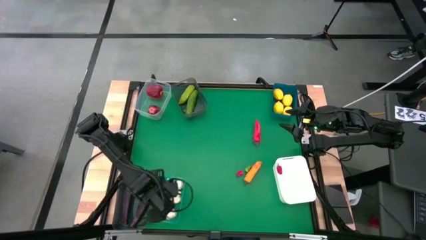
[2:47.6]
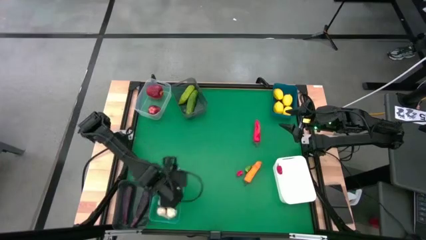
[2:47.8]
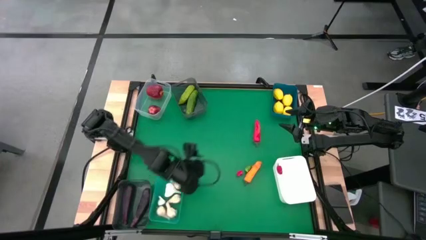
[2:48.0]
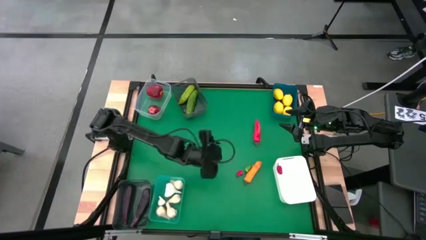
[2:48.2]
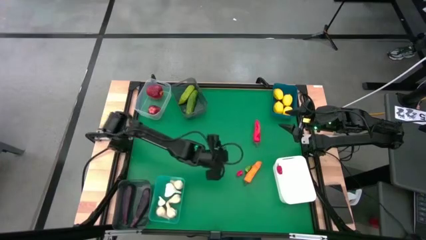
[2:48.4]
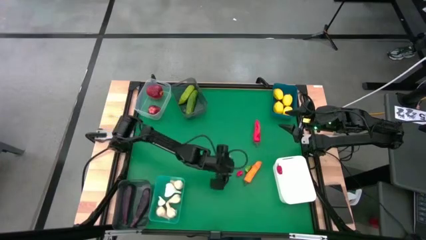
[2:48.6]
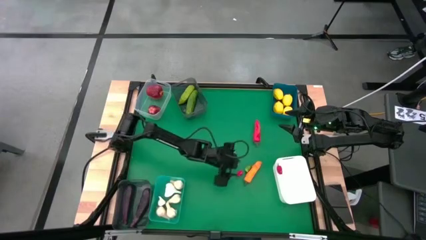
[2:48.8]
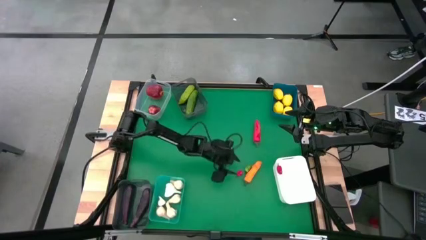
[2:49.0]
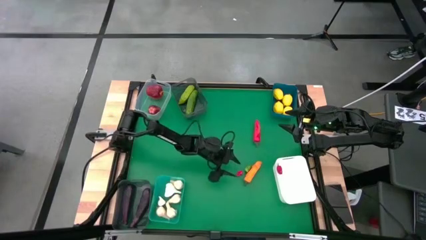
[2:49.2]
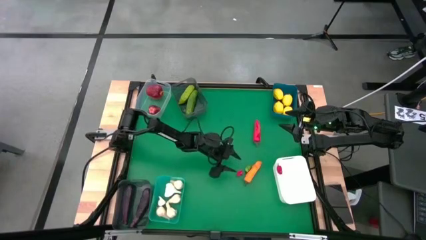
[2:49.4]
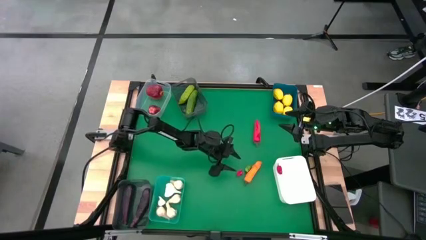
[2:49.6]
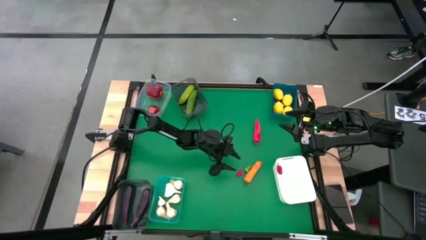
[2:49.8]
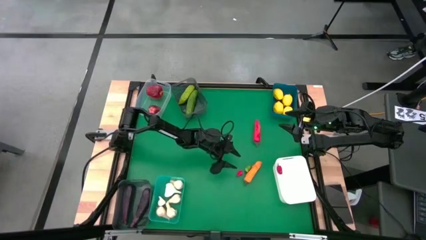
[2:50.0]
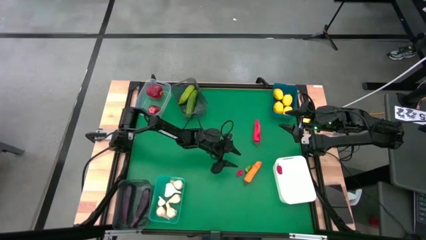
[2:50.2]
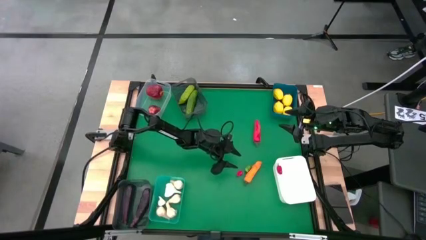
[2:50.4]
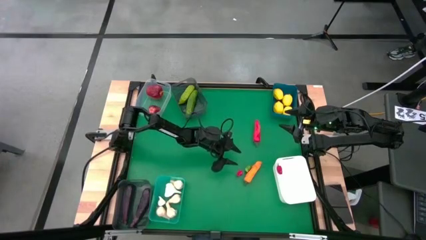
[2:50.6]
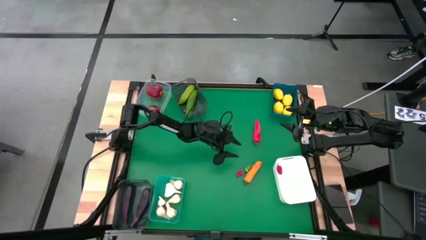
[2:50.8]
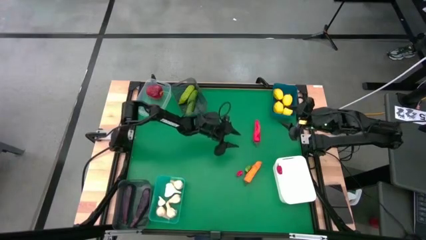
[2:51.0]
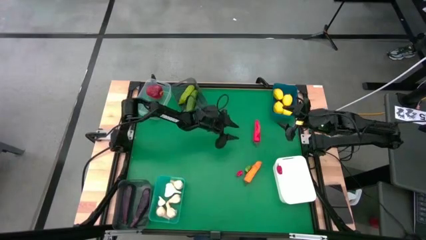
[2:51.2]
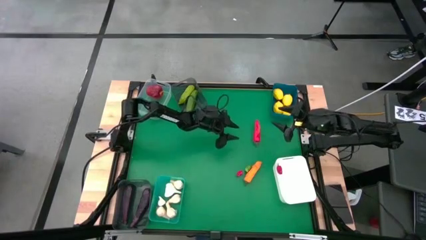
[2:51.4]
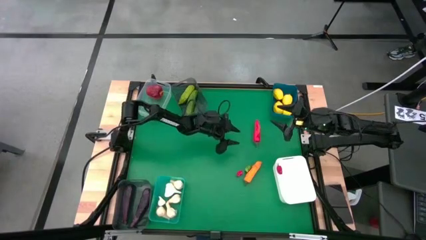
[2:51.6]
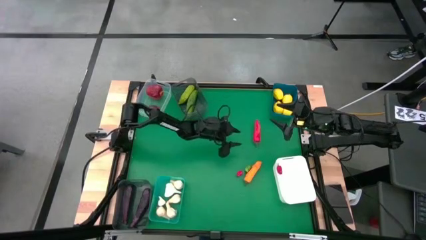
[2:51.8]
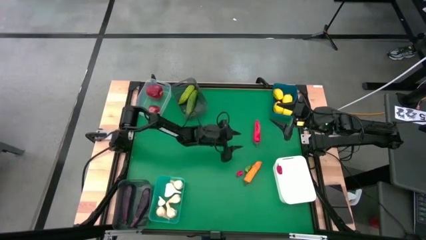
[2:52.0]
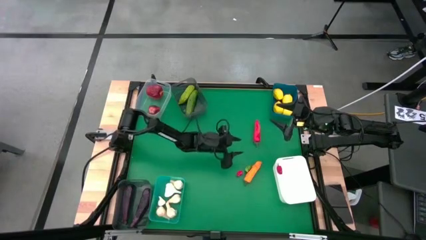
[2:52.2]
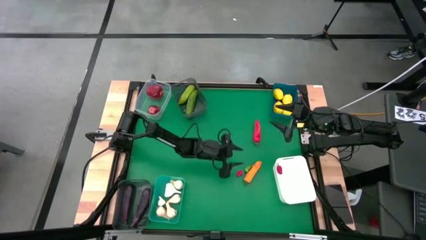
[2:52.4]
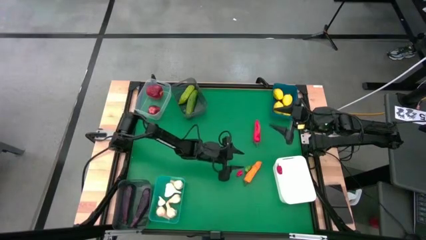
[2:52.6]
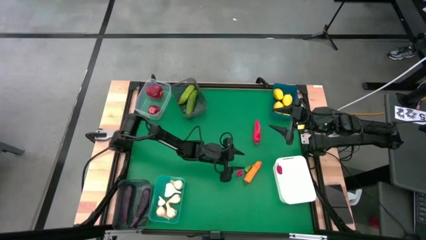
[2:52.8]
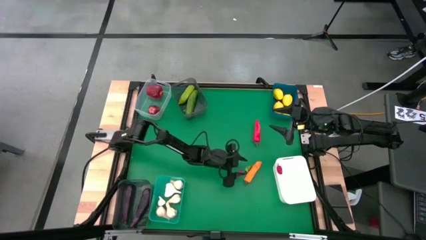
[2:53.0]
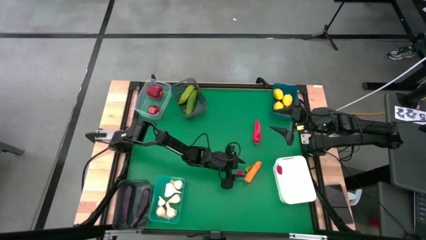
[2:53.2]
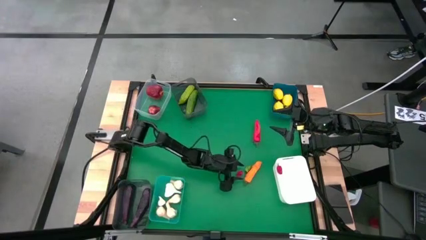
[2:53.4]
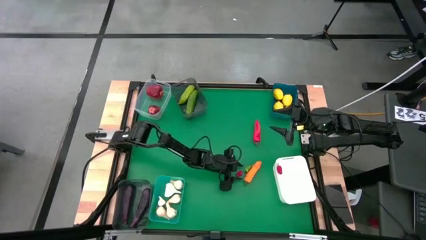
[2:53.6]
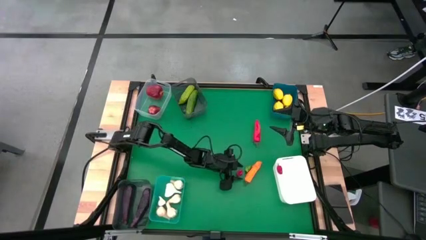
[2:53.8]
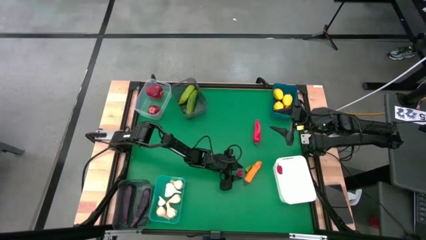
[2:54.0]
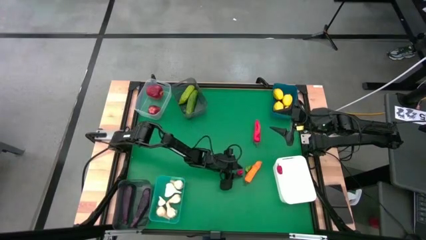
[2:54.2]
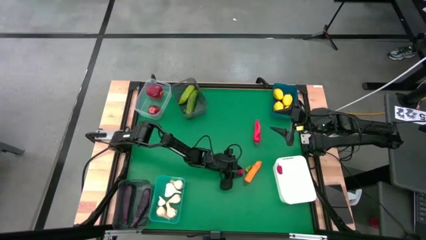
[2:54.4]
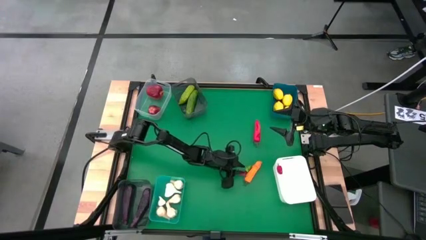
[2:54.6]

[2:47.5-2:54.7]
Task: Sort produce into baskets
Put the red small chili pepper into the white bin

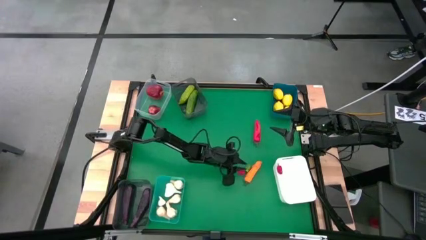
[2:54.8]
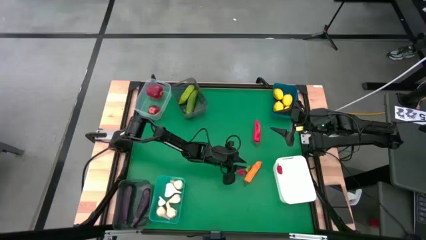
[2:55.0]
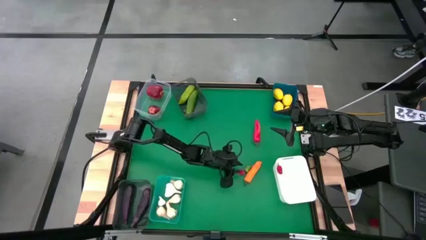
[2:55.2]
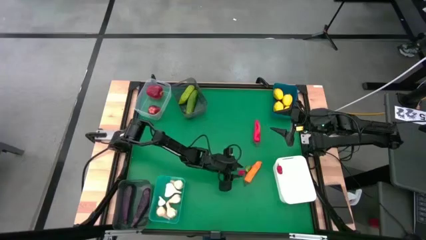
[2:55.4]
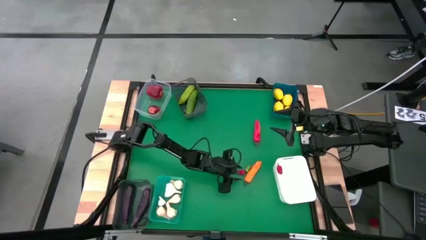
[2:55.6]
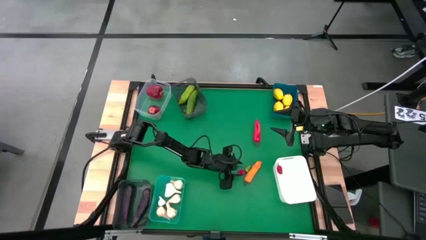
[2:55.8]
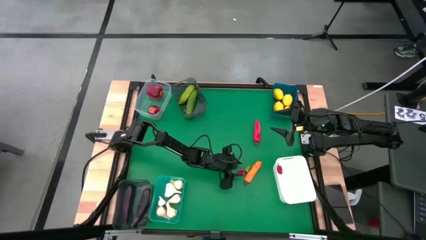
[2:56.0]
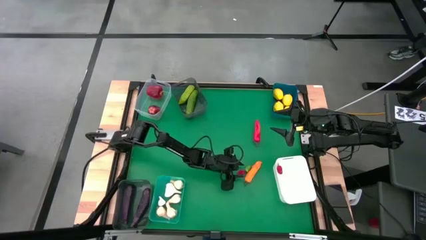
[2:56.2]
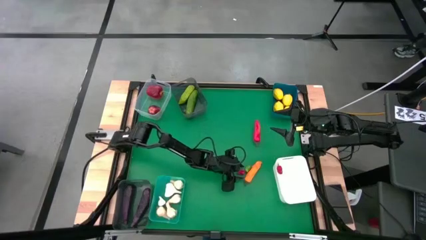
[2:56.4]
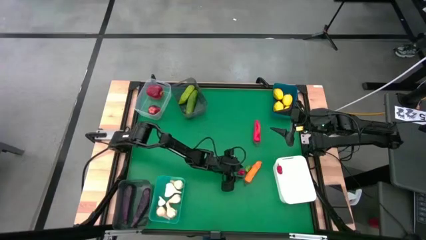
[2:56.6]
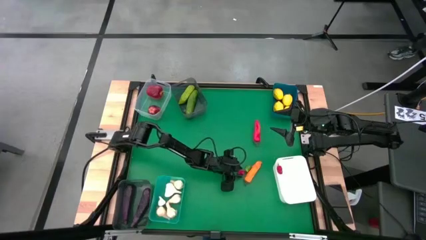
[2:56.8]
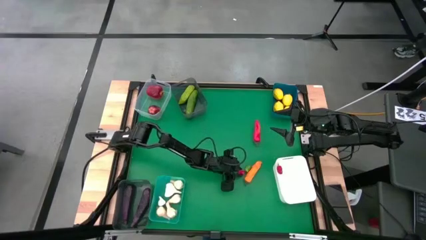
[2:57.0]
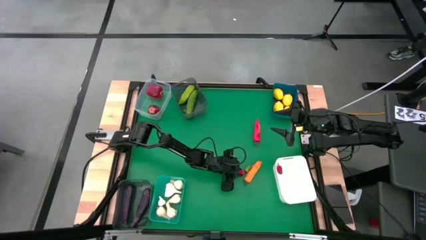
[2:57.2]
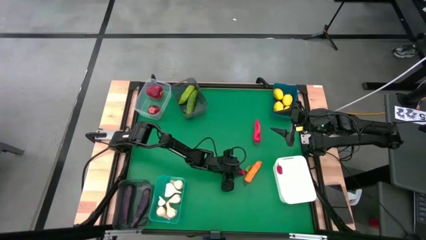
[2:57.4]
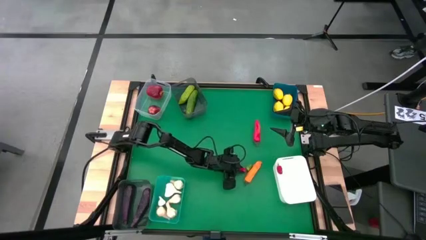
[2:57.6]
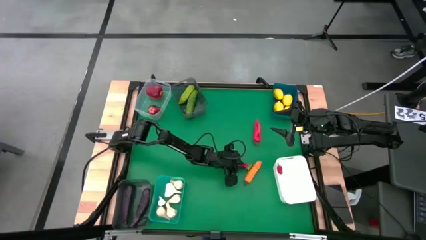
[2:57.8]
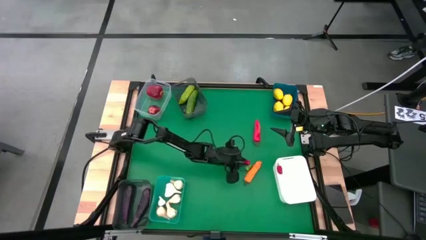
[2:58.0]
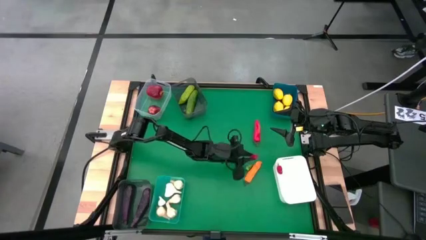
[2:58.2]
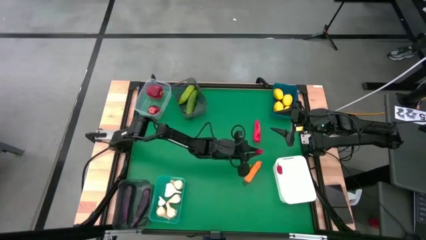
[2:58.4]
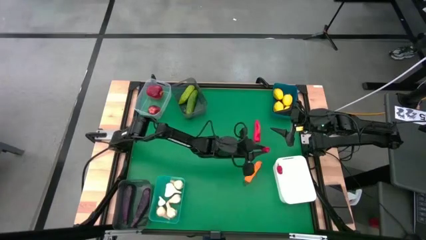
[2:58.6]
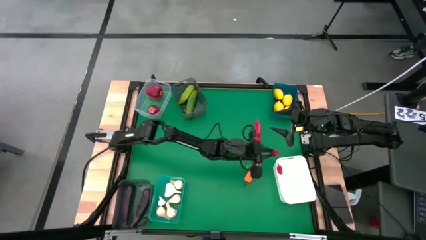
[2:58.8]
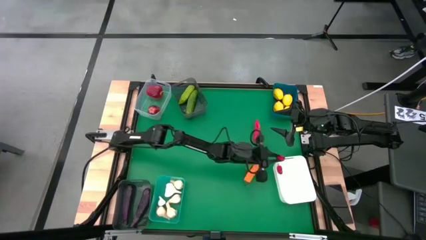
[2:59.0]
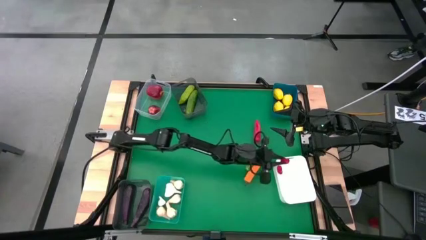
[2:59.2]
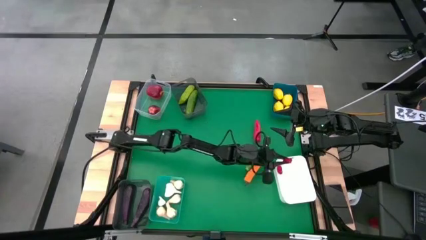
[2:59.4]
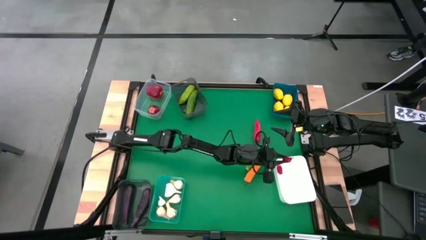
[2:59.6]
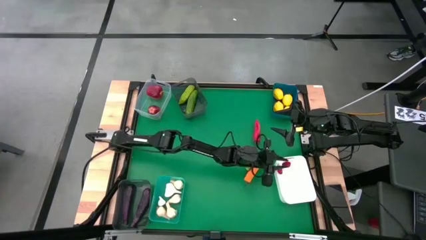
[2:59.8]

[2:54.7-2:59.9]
Put the red small chili pepper into the white bin

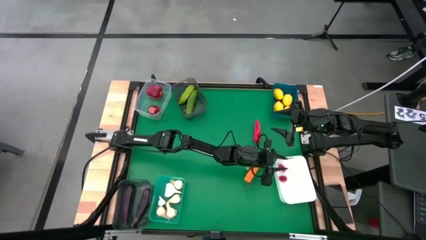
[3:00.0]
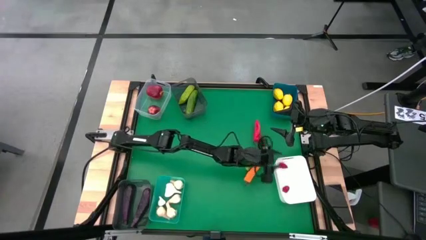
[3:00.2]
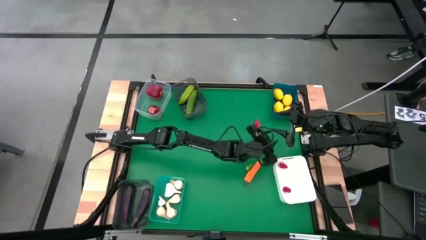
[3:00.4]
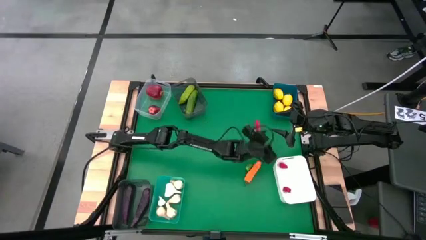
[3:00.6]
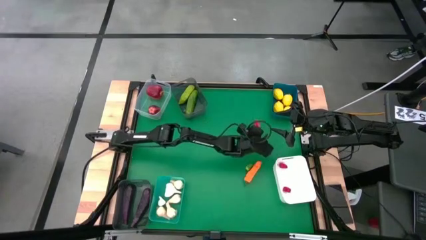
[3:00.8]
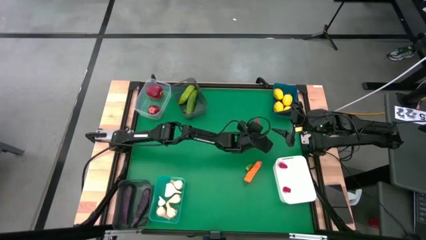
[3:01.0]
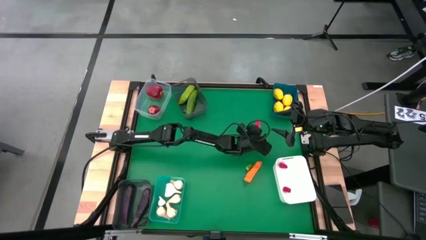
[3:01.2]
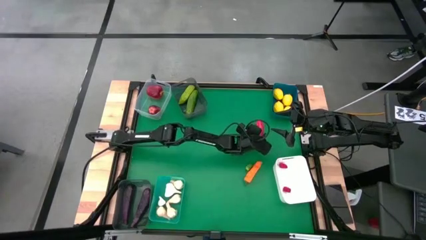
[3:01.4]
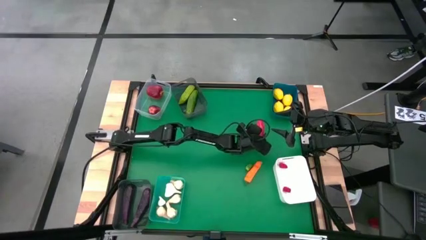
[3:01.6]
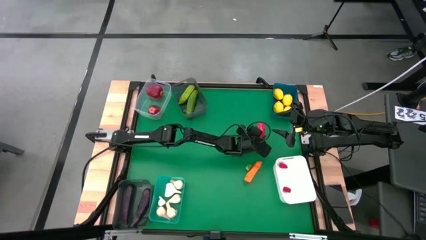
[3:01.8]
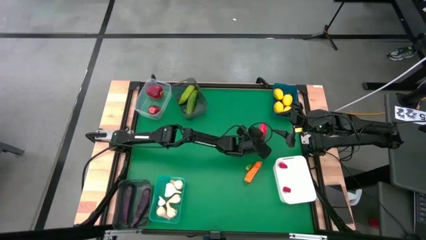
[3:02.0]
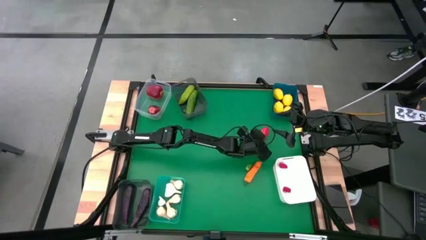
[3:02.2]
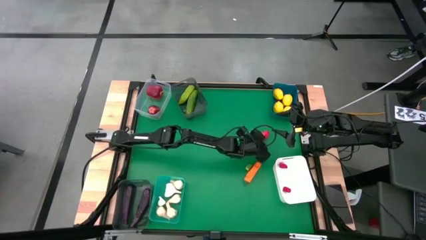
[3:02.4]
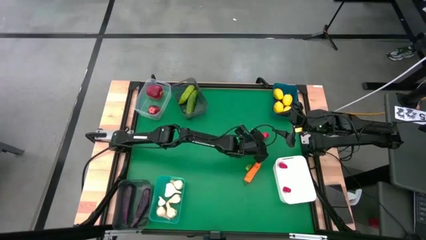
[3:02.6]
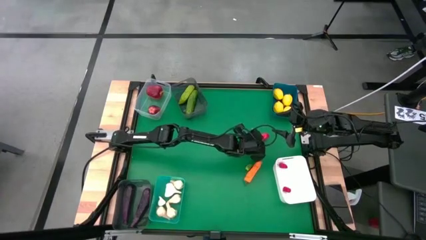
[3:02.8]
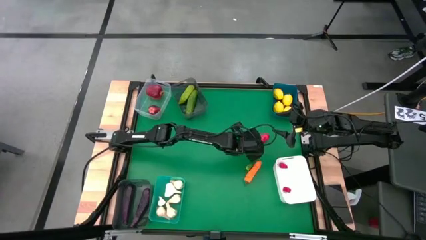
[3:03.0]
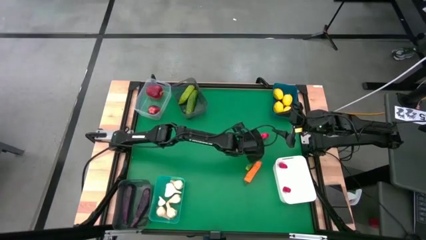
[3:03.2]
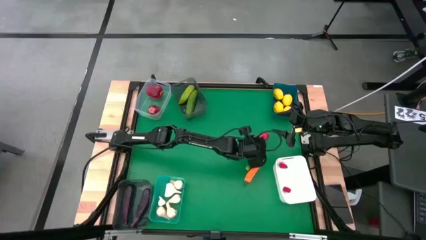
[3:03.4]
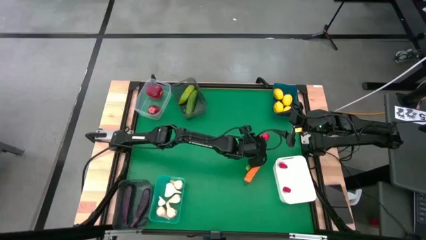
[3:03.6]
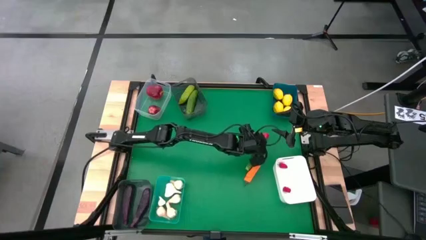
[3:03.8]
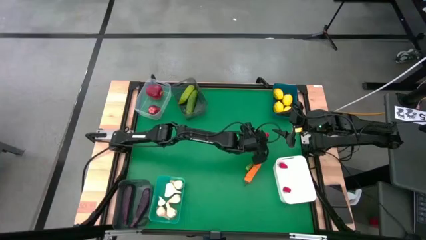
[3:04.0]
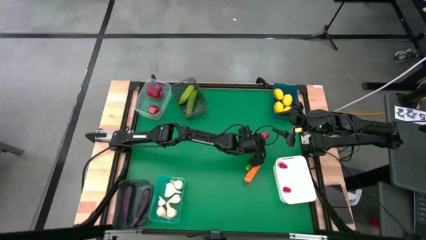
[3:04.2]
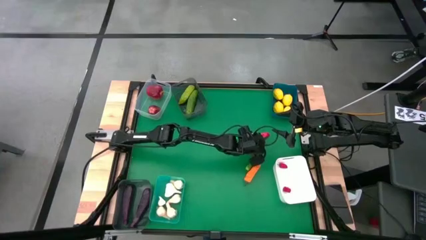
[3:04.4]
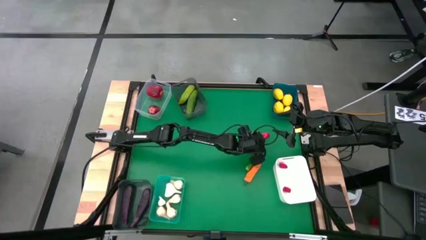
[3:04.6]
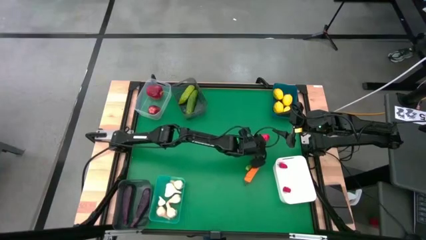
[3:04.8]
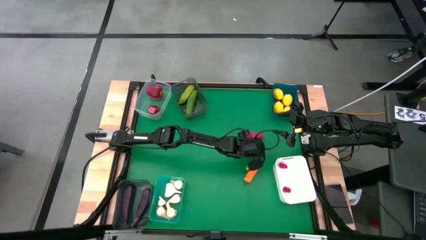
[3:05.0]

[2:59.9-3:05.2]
Put the red chili pepper into the white bin
